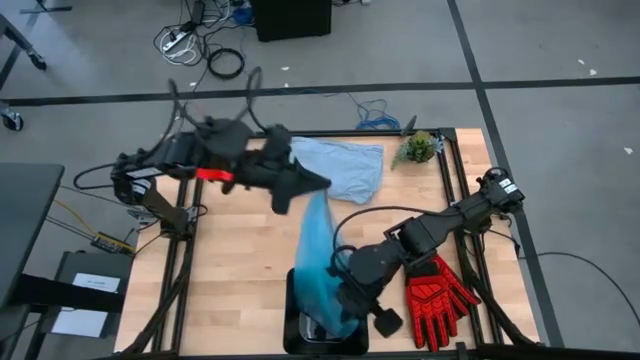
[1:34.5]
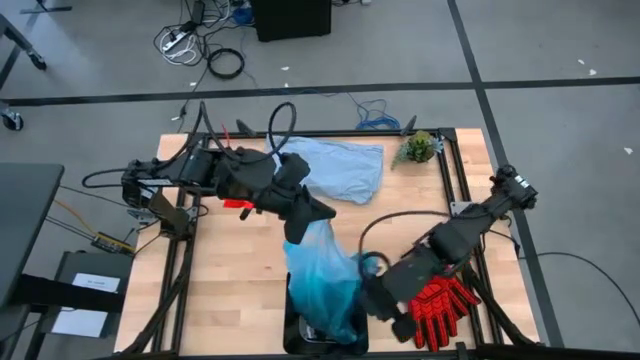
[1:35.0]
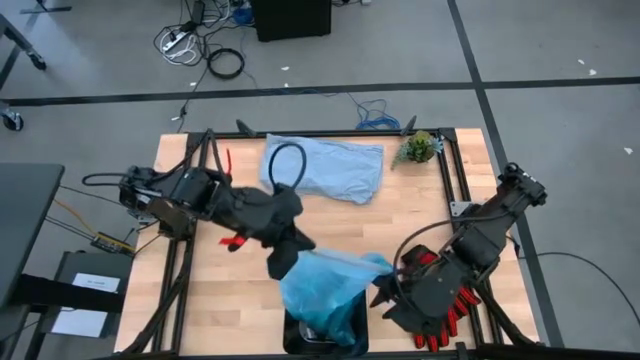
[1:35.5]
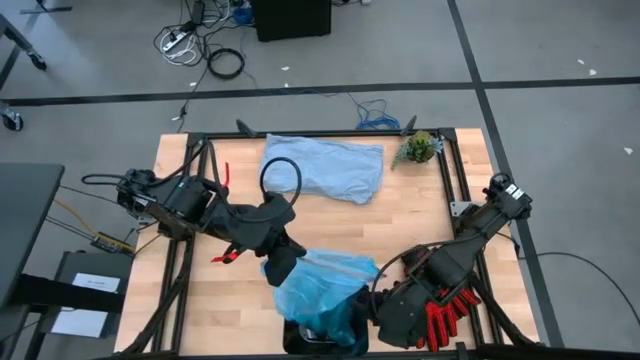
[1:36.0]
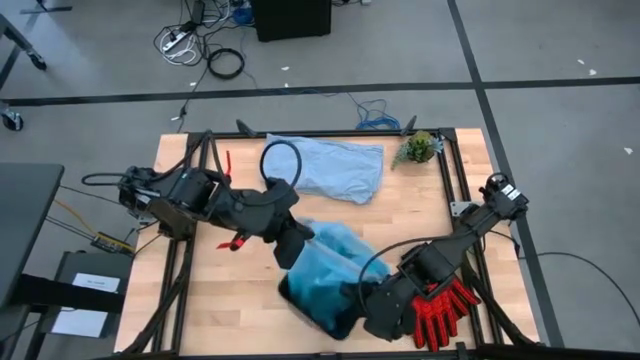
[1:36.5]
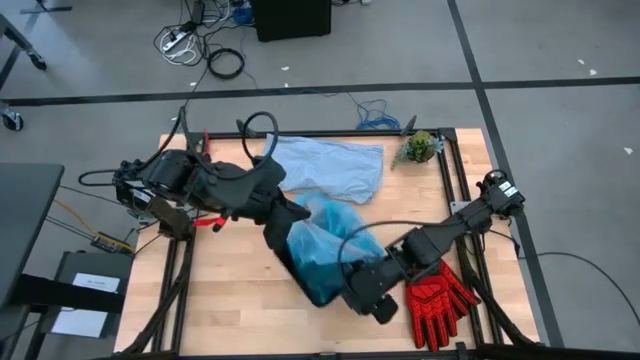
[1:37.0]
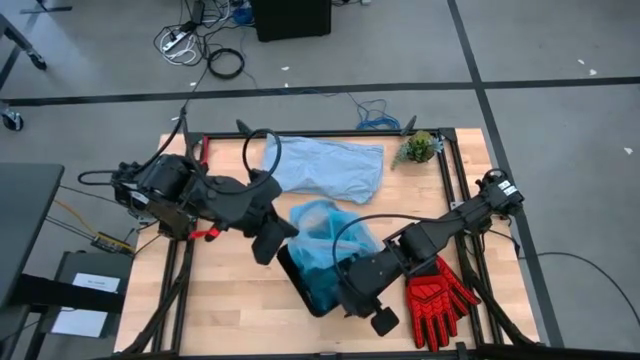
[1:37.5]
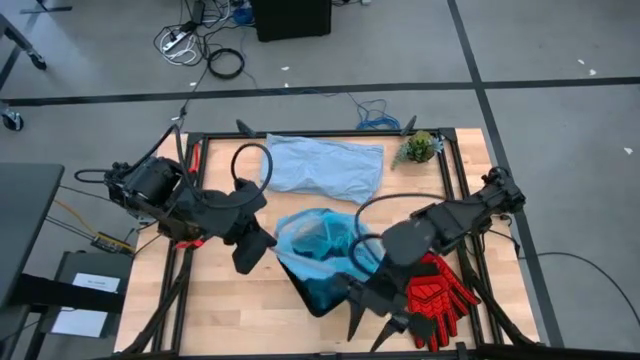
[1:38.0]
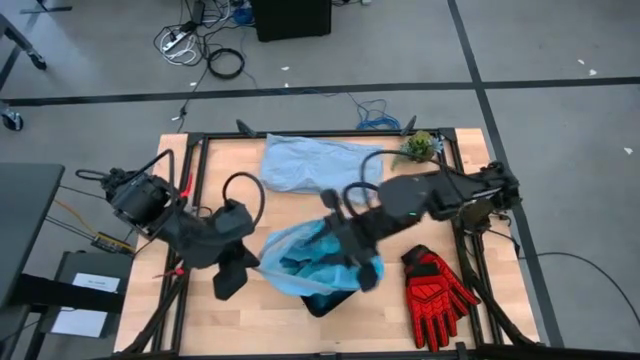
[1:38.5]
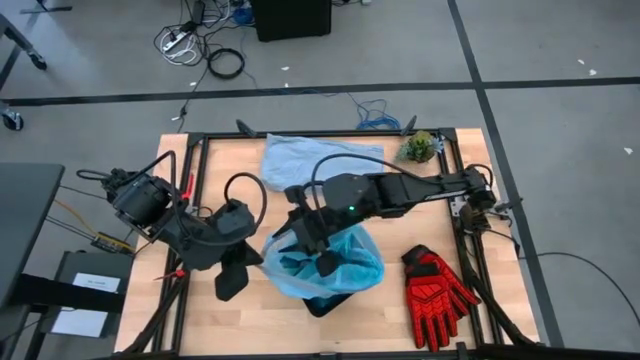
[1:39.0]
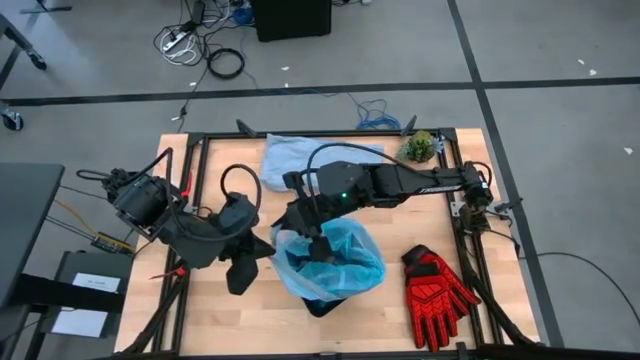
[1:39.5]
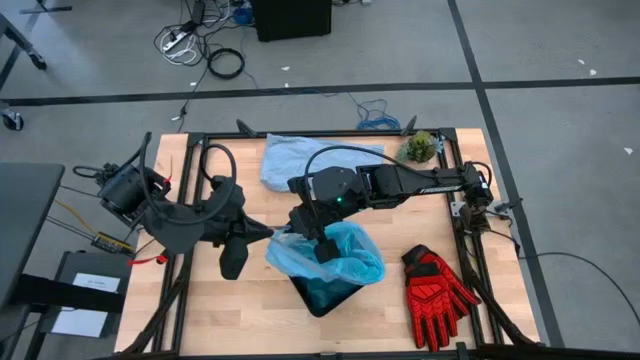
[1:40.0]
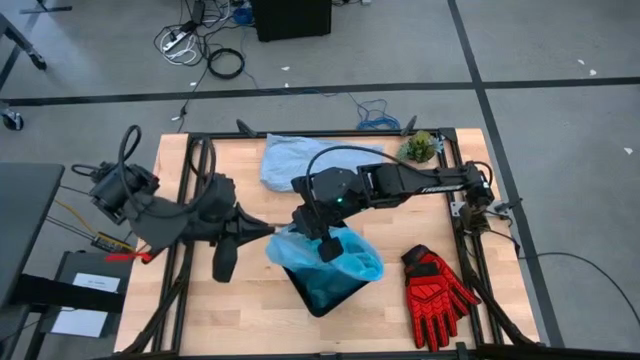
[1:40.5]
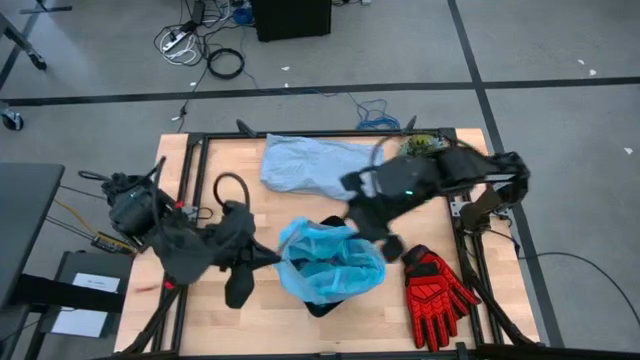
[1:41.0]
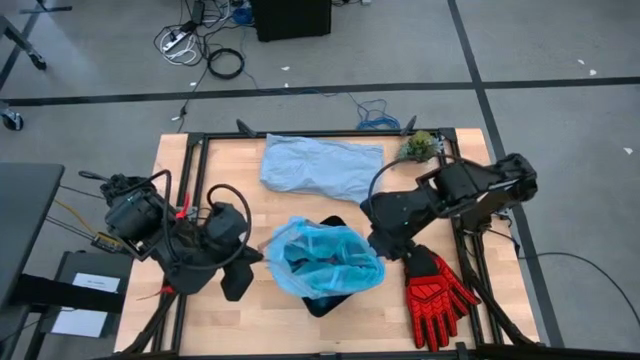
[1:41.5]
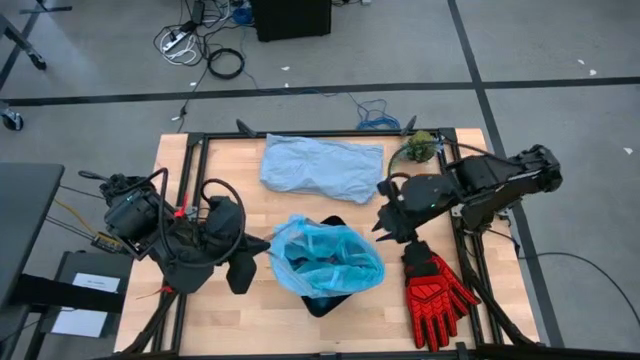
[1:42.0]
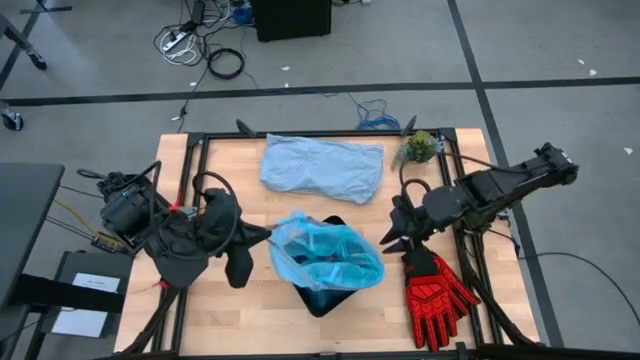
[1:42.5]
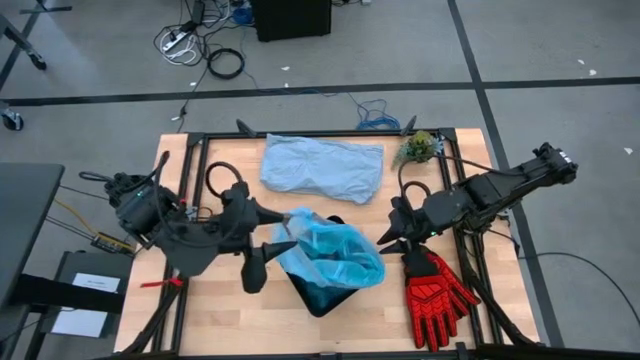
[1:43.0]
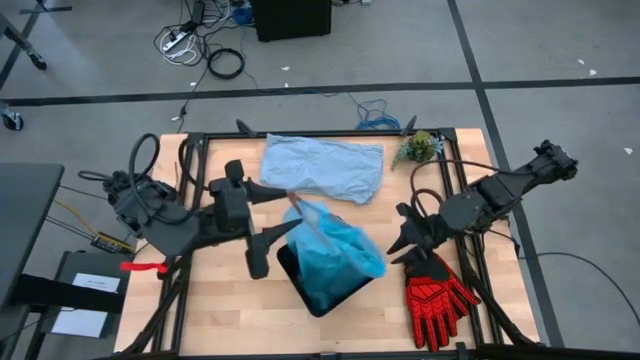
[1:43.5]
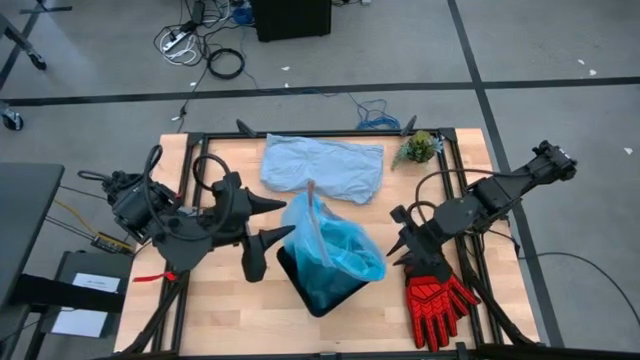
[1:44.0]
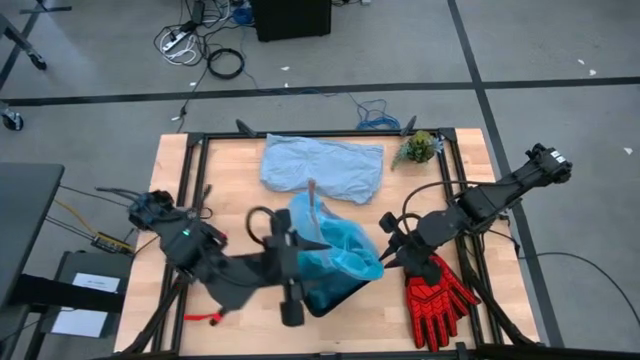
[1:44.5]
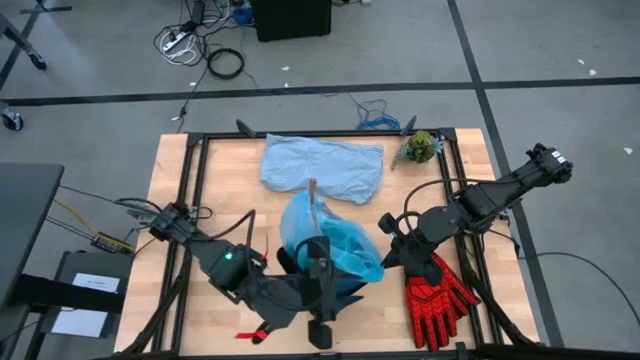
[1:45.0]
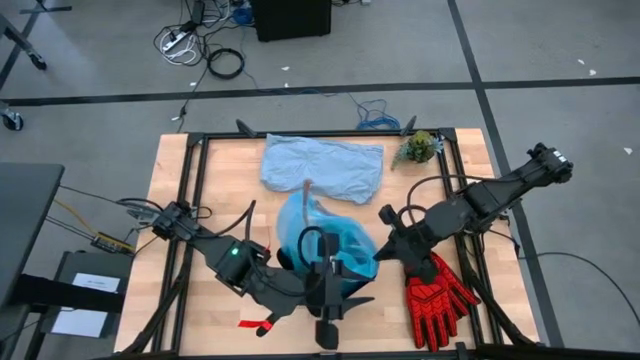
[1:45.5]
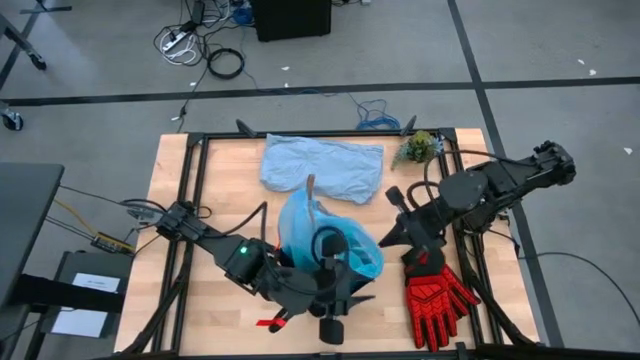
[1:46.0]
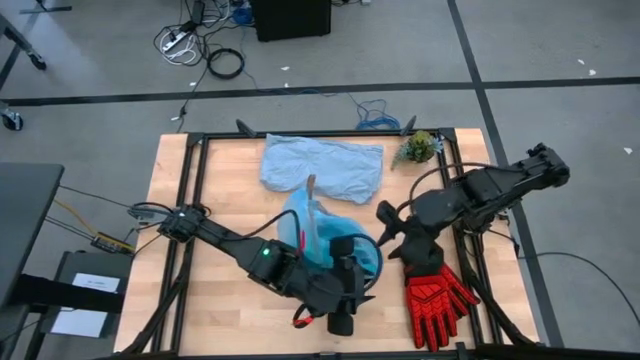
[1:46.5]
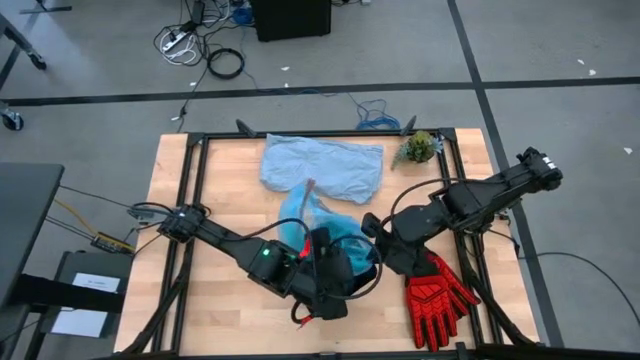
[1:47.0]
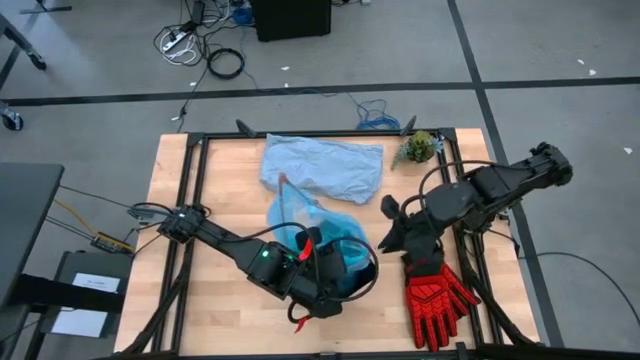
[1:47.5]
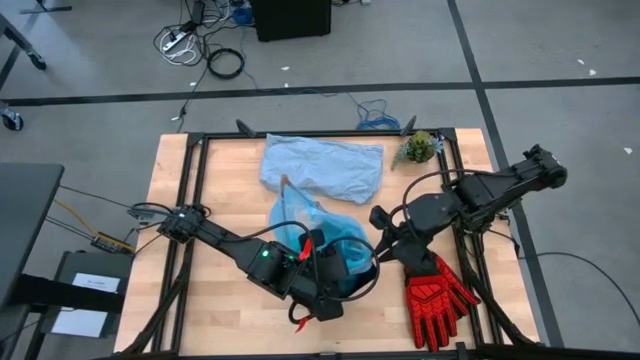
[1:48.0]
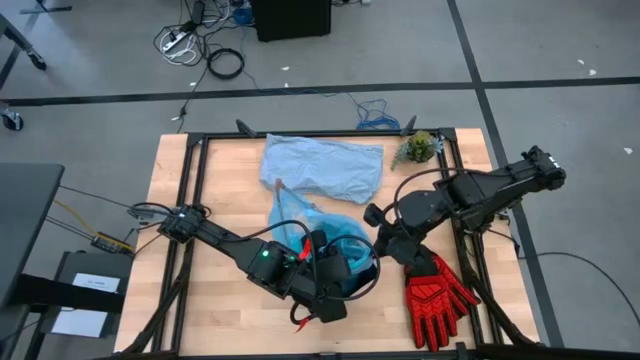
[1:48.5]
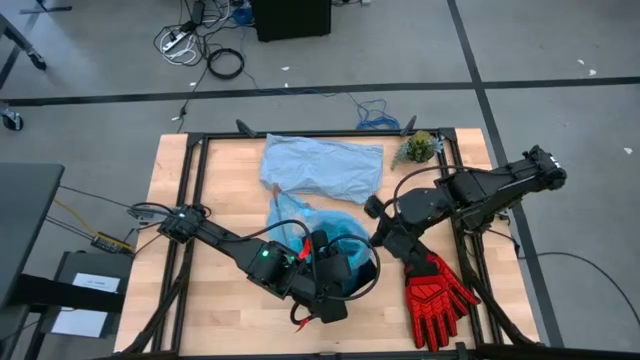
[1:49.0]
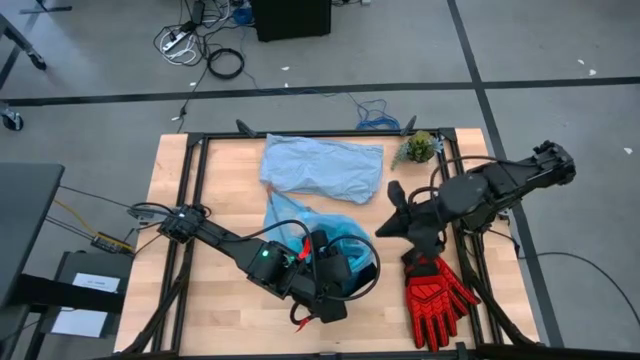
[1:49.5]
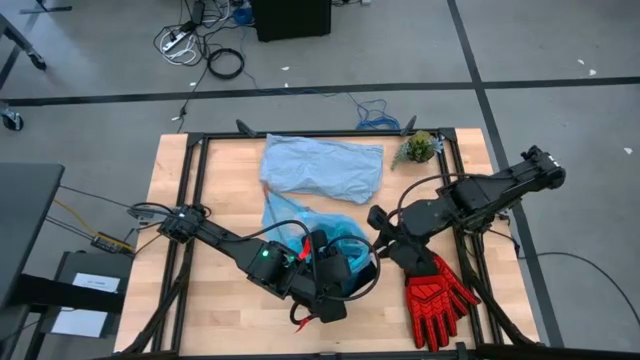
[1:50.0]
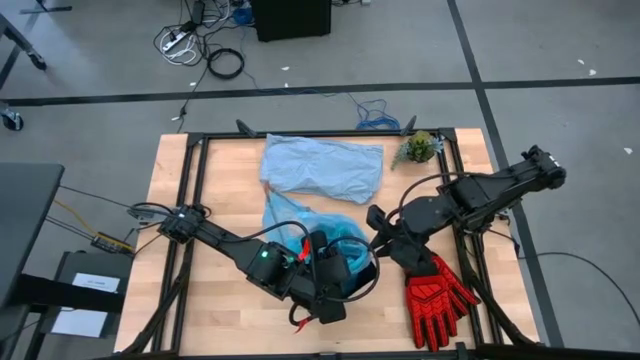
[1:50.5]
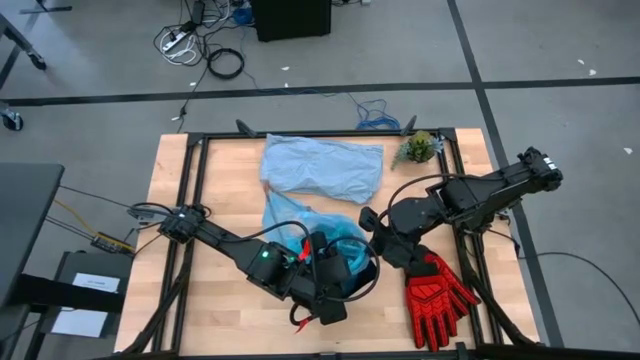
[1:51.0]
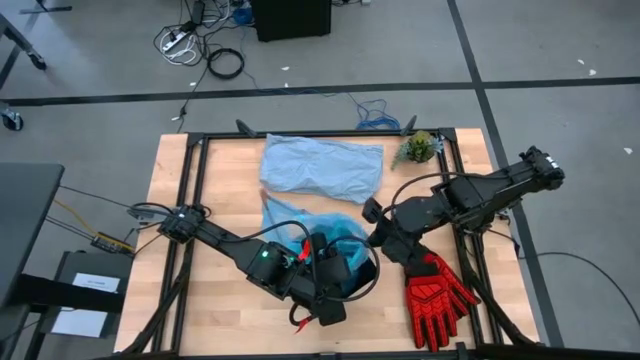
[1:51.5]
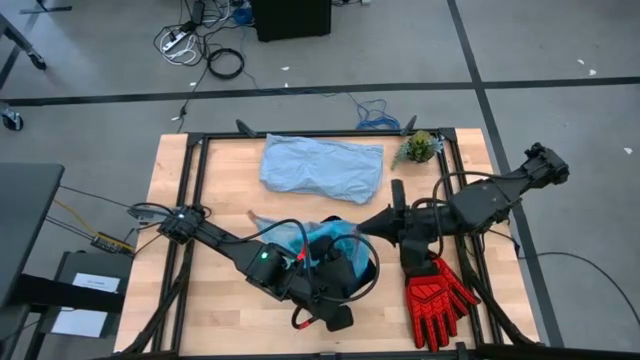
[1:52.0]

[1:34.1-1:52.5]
Task: place trash/remove bag and relplace
Close the light blue trash bag

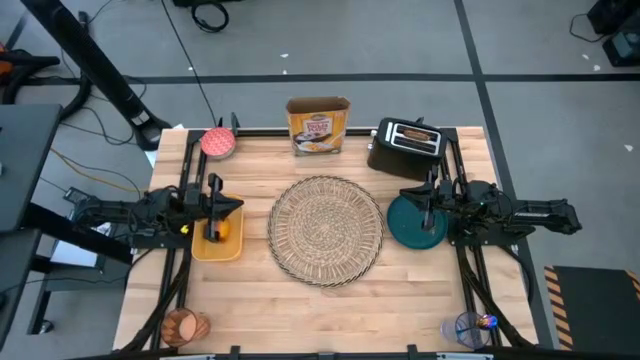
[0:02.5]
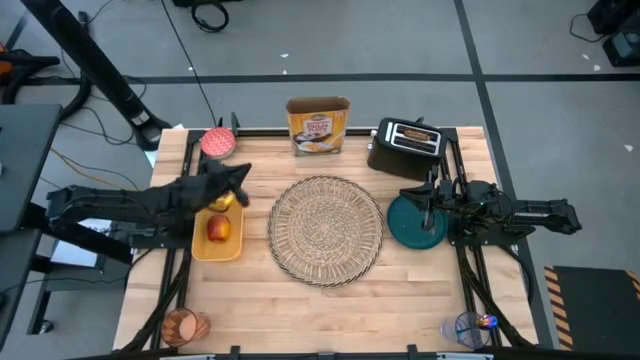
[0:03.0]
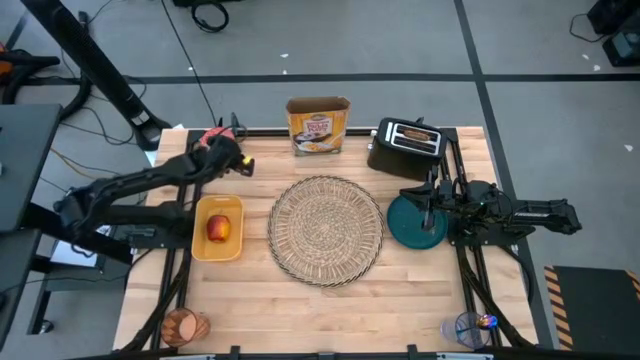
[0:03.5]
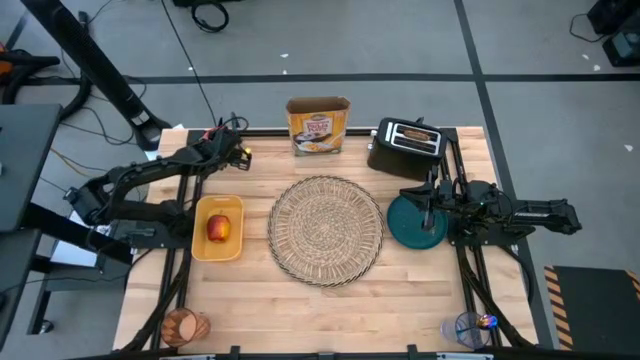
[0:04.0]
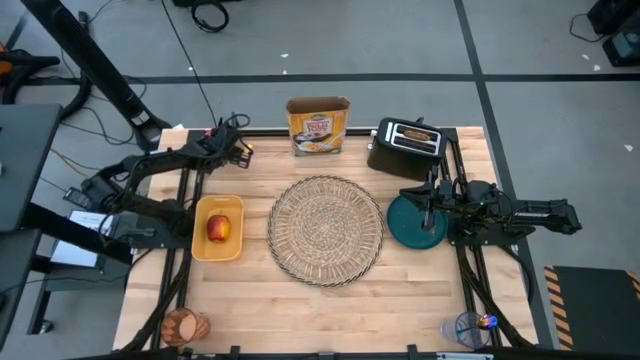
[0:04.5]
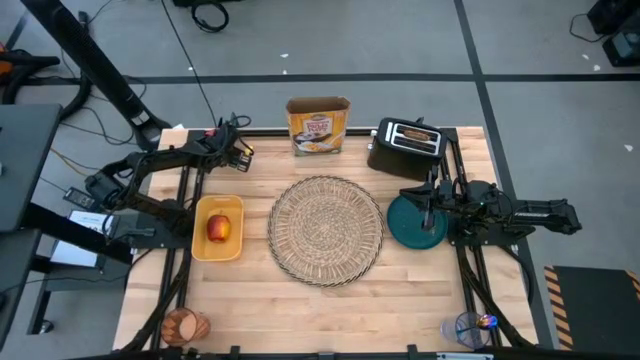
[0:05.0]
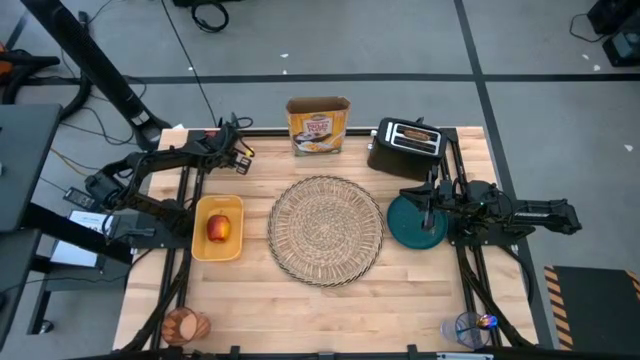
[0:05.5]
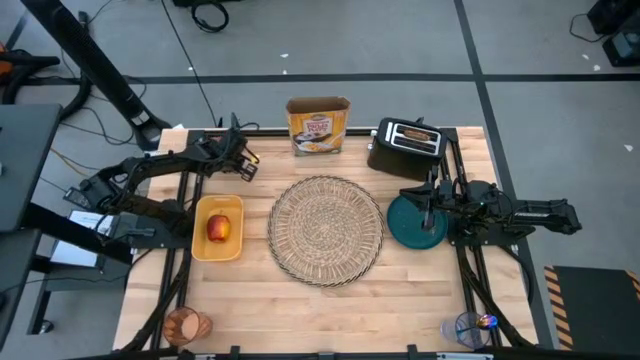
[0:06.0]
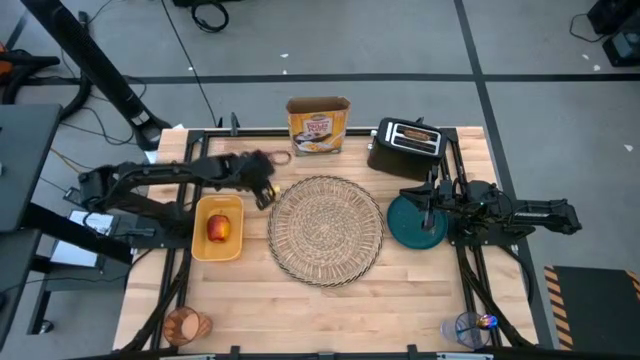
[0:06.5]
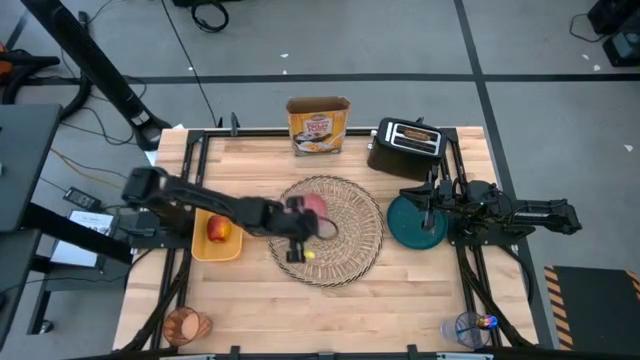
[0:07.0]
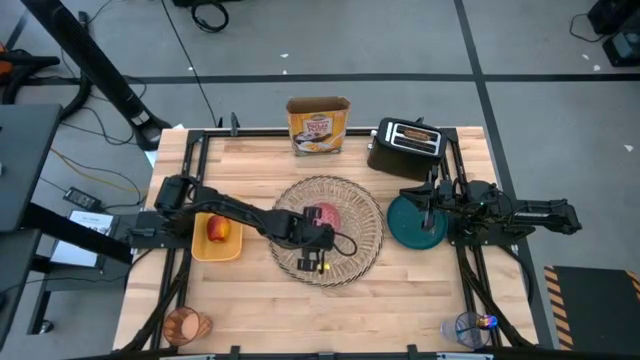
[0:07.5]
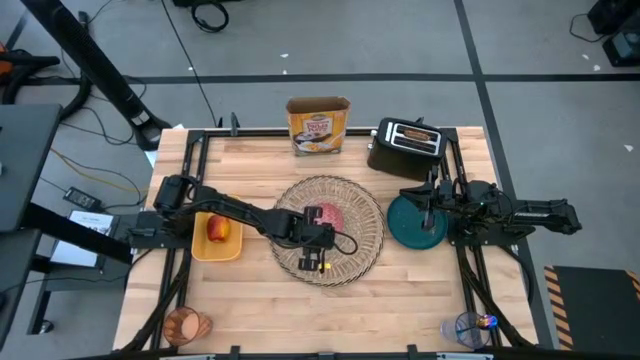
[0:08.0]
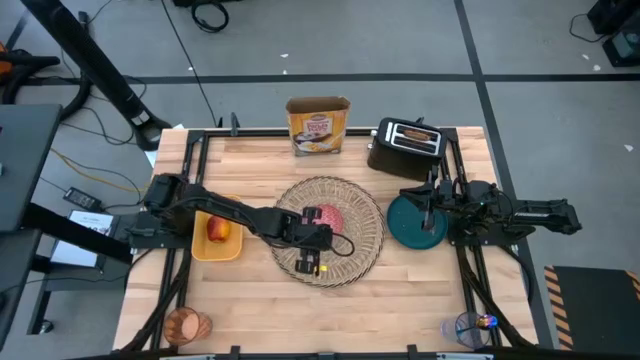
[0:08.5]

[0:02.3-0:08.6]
Task: Arrange a breakfast setting
Put the red bowl on the brown table mat
